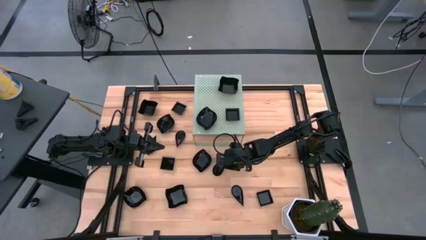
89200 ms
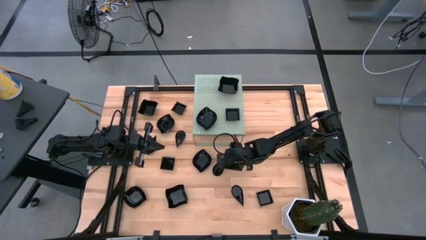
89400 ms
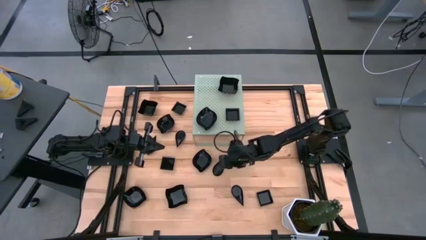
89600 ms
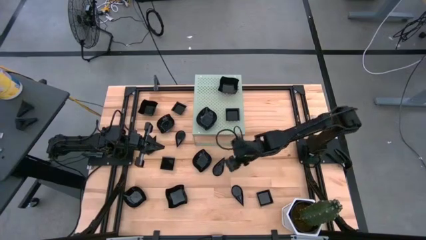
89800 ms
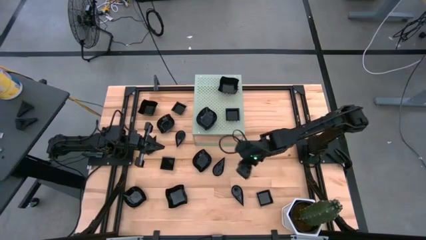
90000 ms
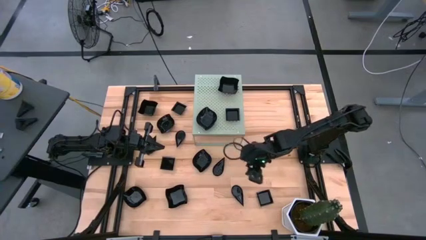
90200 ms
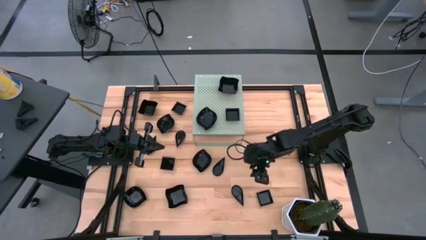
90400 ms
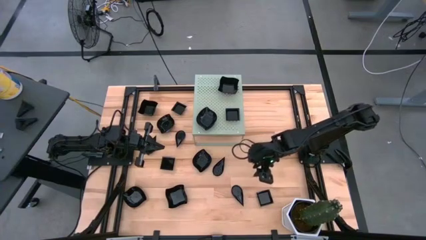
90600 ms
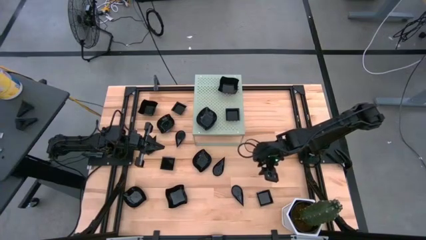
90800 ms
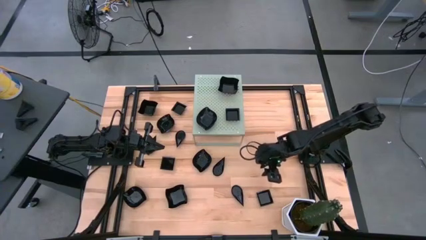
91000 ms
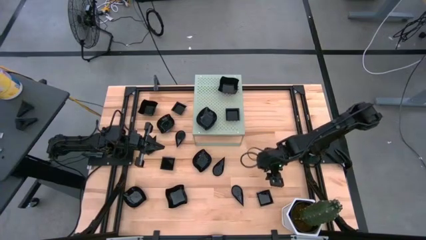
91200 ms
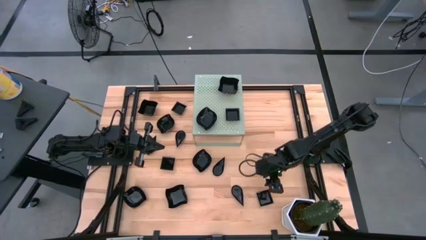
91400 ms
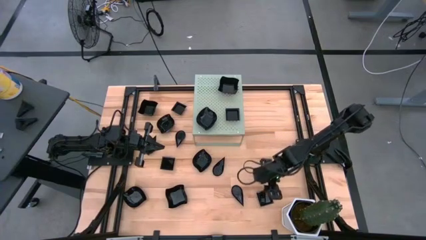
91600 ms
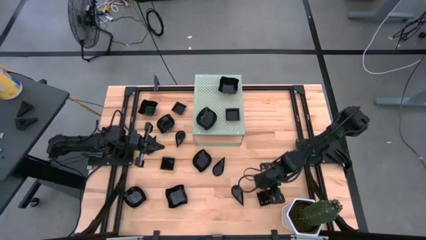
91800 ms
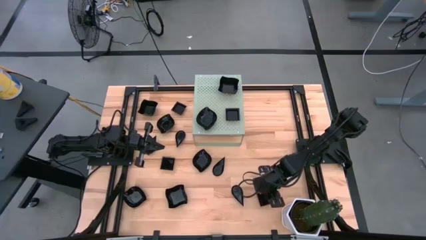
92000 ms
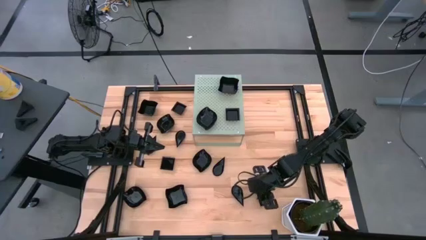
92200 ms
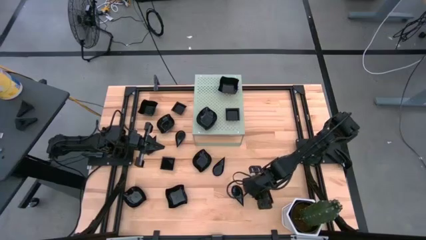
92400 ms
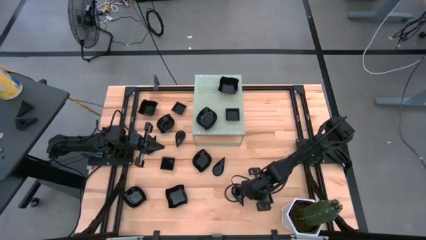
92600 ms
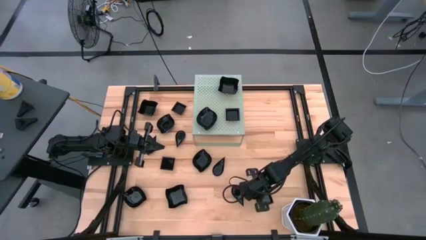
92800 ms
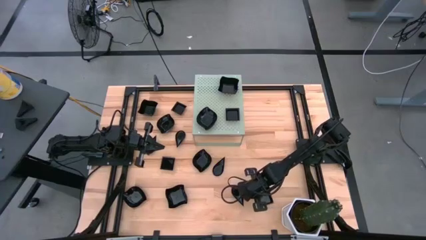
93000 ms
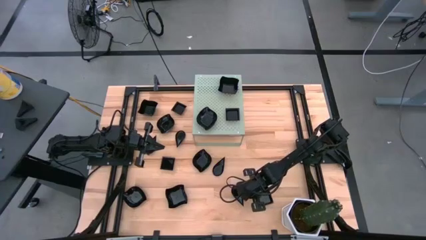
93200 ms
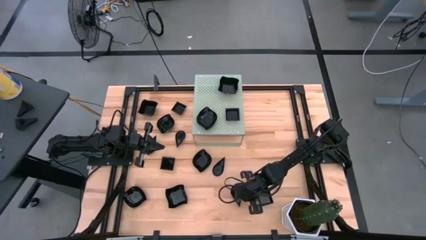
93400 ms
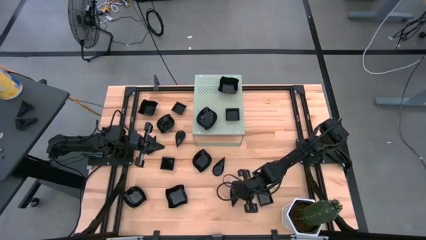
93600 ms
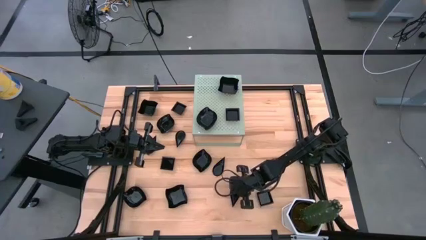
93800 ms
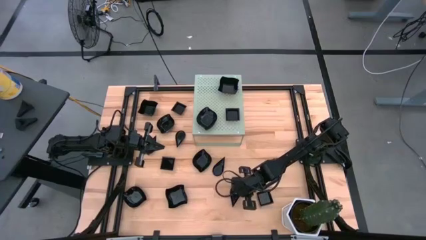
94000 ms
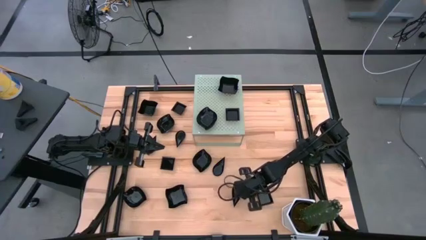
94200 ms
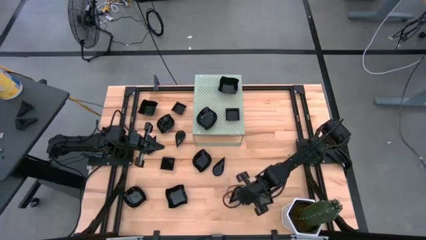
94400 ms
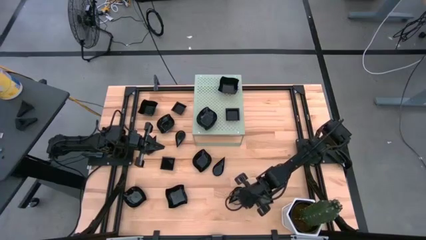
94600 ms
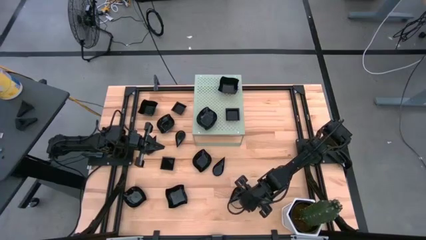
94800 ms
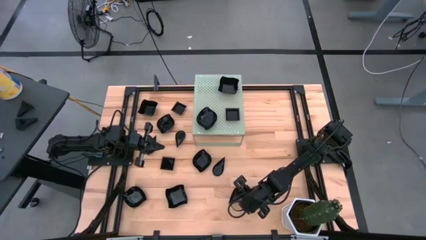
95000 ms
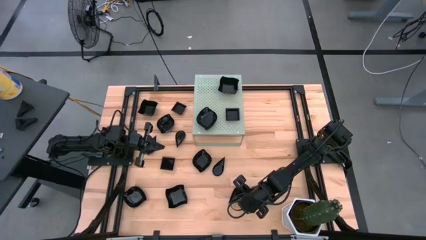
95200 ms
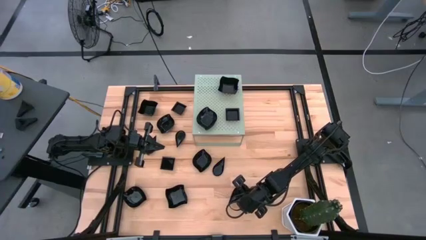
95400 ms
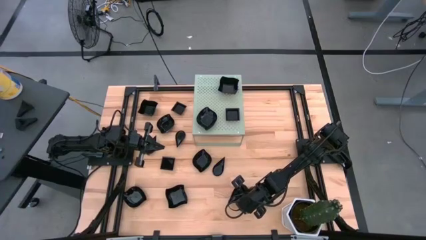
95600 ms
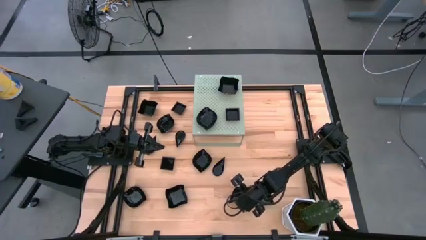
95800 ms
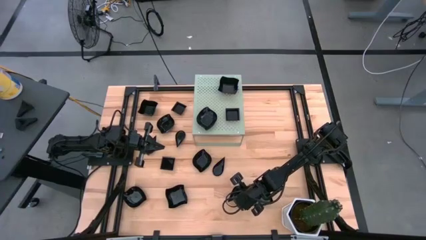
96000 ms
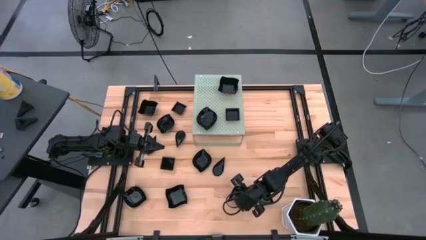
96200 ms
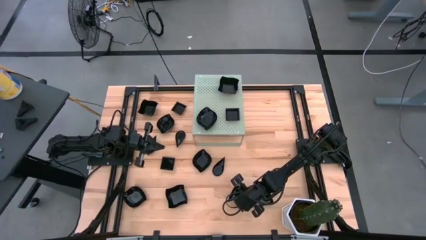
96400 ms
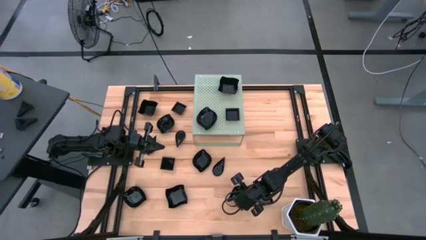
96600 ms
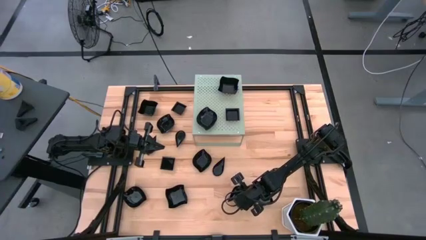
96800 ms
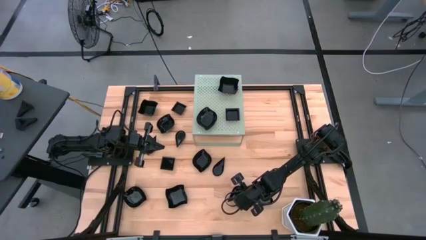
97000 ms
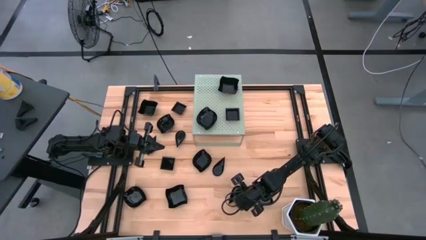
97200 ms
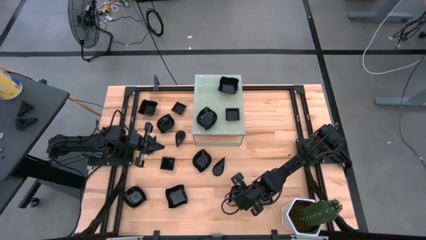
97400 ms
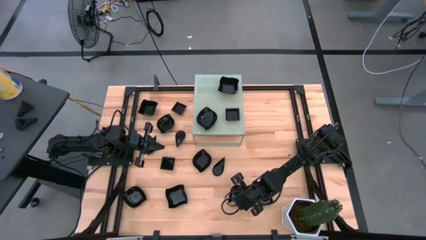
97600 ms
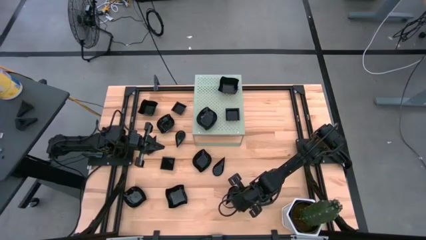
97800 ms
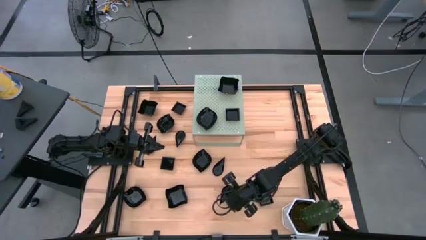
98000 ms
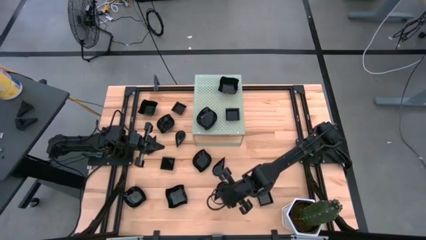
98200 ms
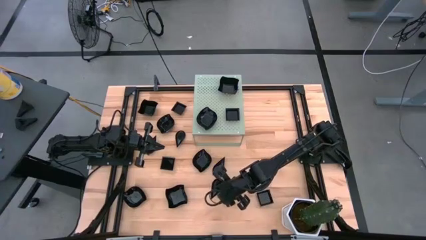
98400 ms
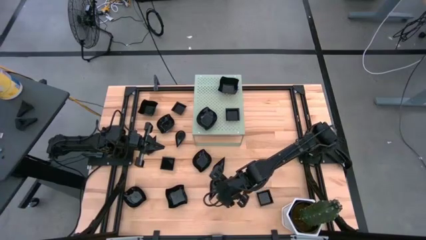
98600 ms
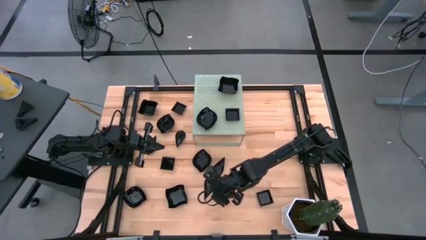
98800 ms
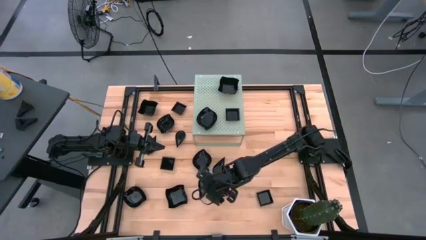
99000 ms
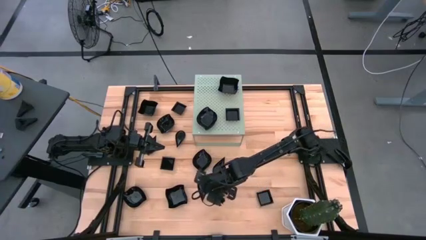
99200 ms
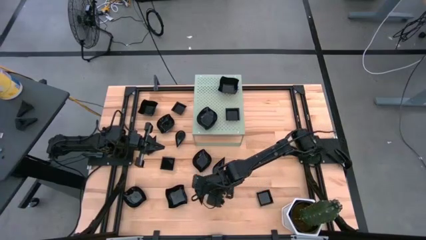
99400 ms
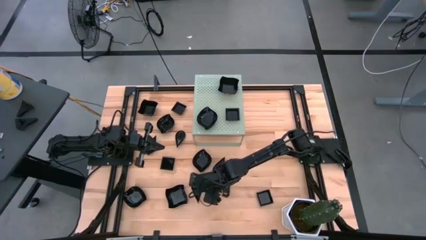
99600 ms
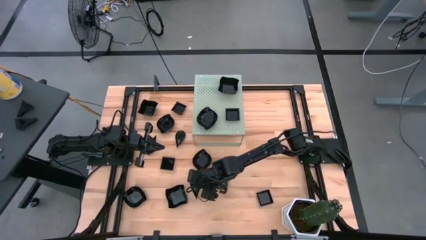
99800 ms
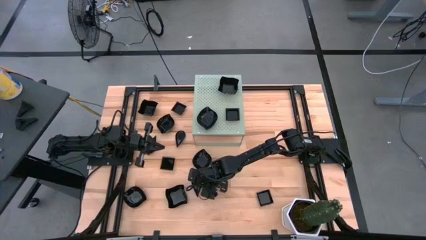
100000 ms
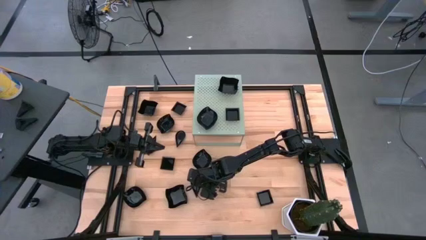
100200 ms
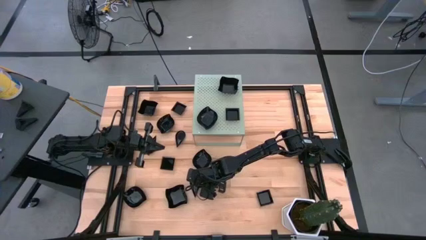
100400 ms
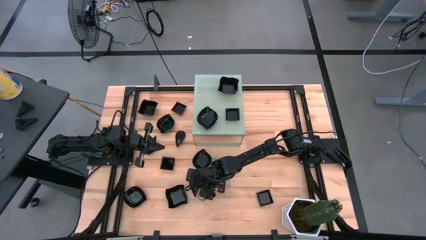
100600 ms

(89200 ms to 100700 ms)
Task: Pick & Place Mini shaped plates
Move the drop shaped plate towards the left of the table

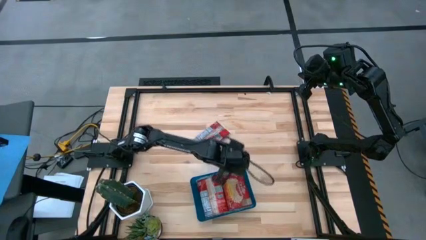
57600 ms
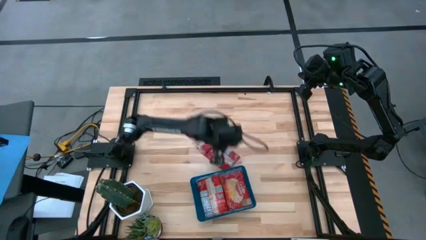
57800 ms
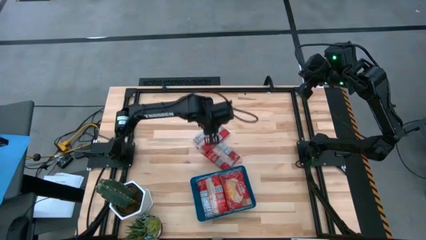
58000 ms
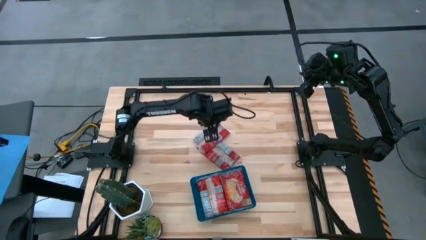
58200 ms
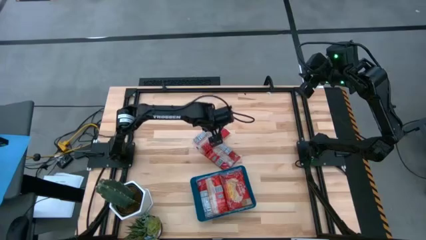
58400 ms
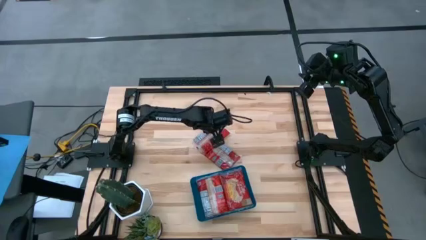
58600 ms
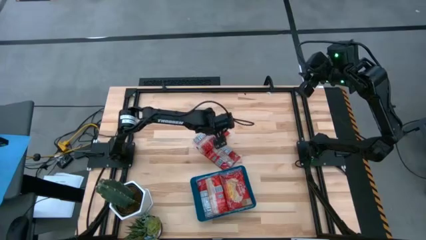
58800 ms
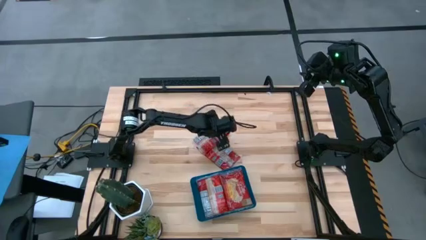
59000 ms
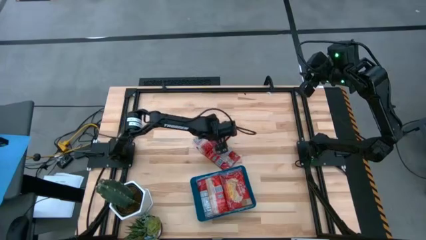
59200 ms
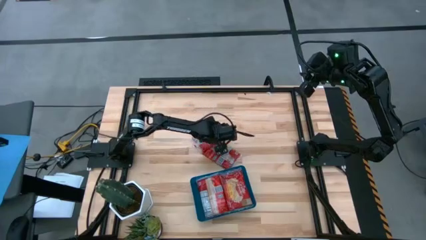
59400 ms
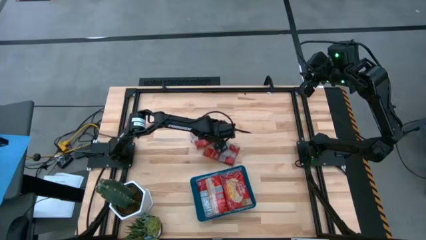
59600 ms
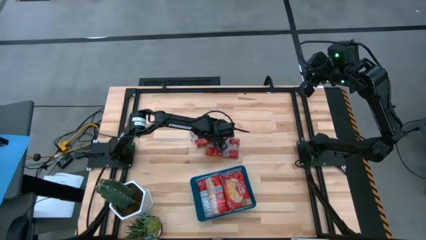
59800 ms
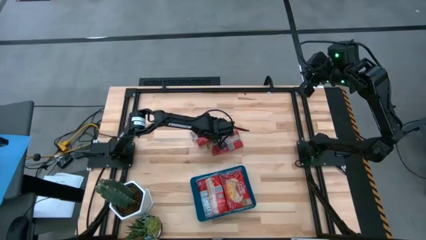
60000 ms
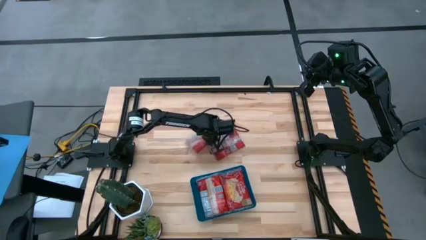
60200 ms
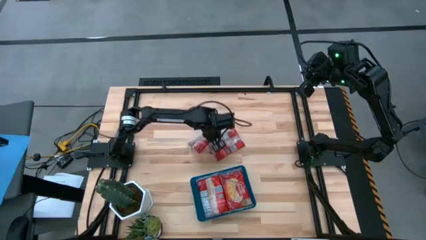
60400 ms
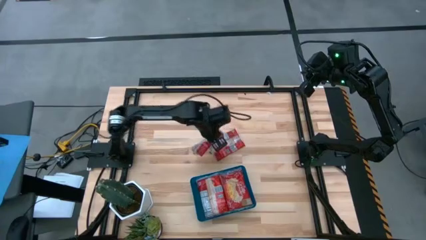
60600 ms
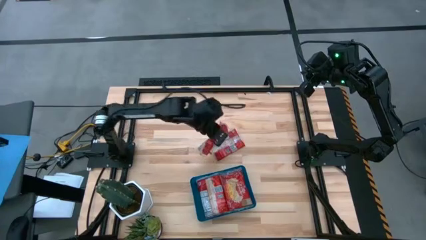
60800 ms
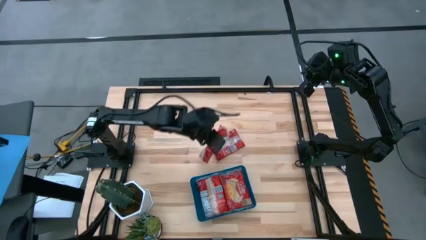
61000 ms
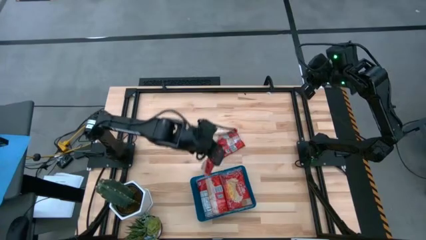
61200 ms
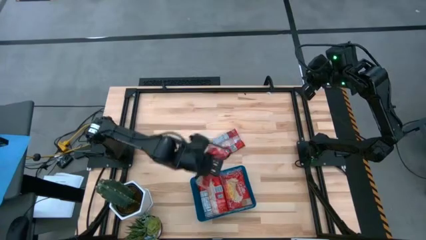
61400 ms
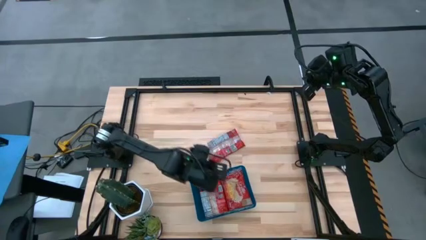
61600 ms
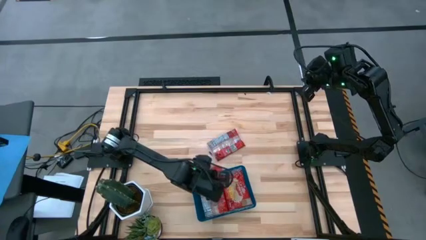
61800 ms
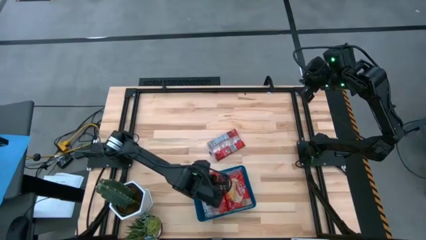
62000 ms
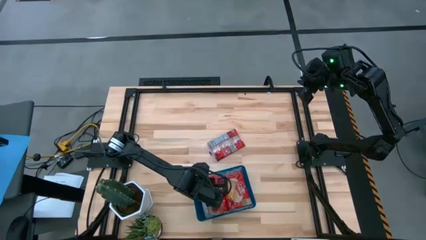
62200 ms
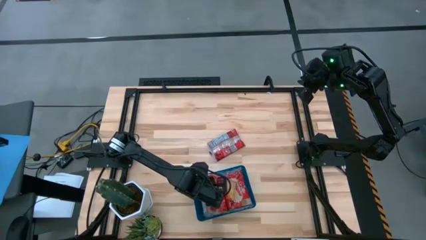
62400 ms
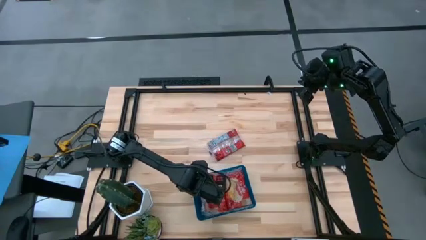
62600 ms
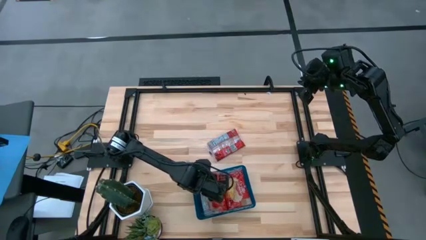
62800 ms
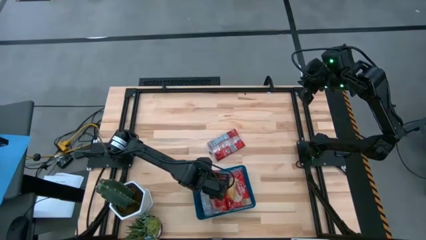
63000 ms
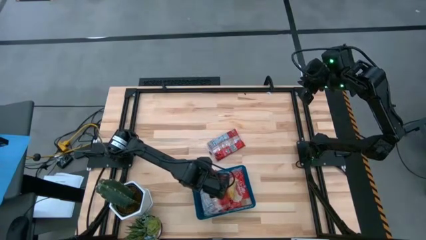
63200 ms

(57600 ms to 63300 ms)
Task: Sort popcorn bags into baskets
Put the popcorn bag into the blue bin
